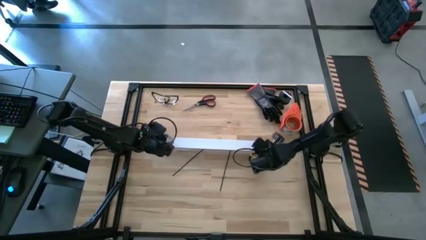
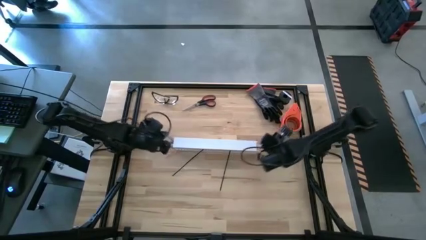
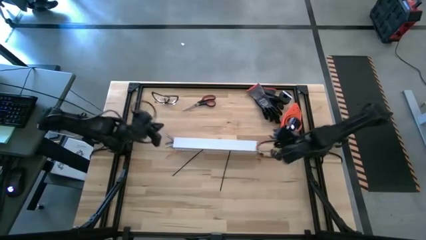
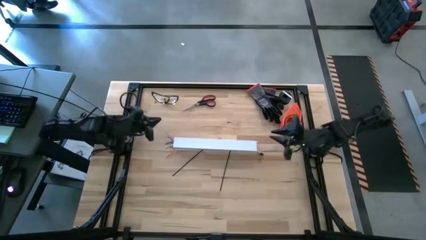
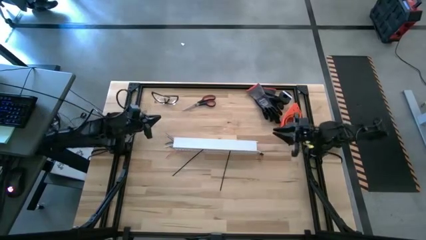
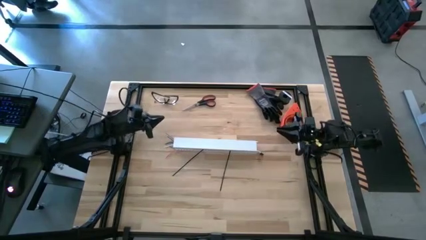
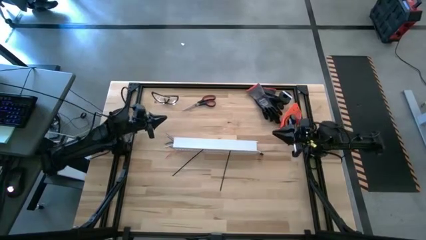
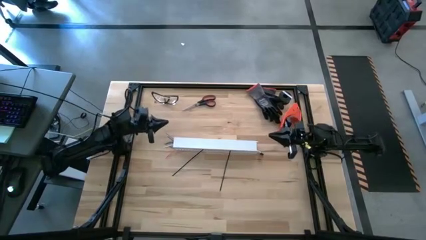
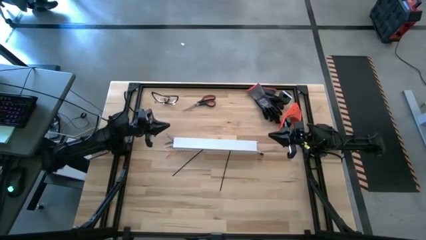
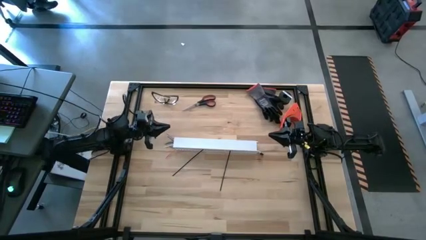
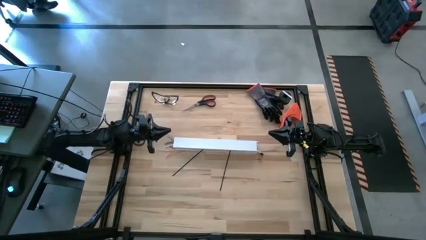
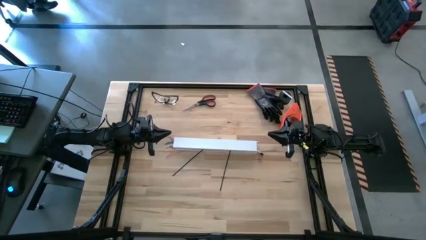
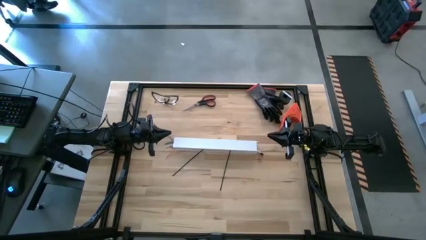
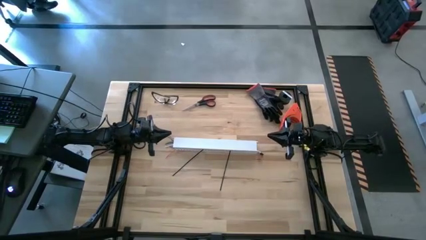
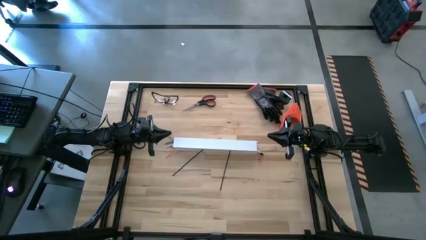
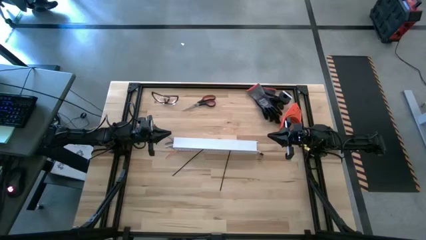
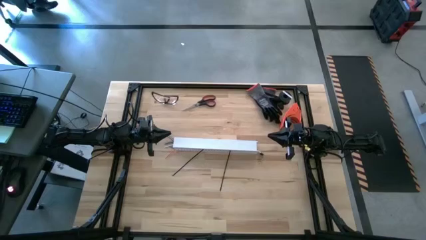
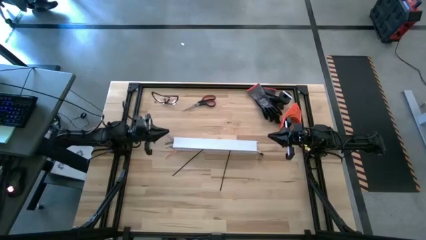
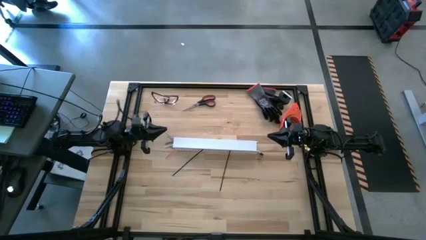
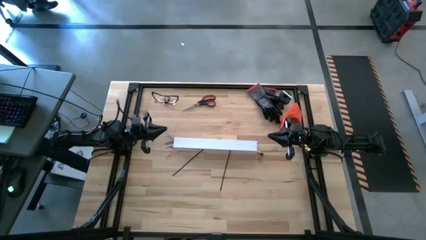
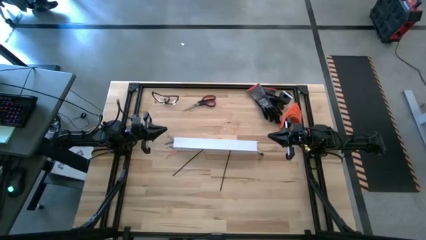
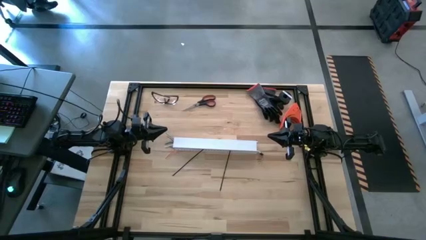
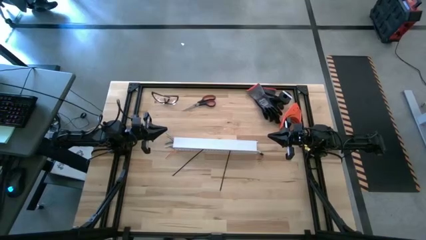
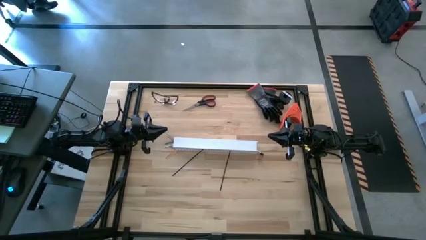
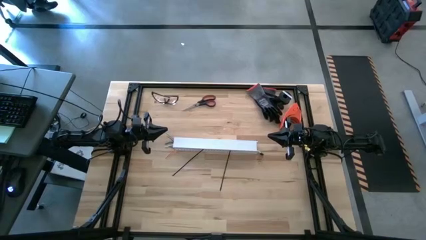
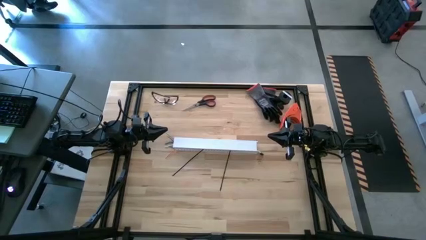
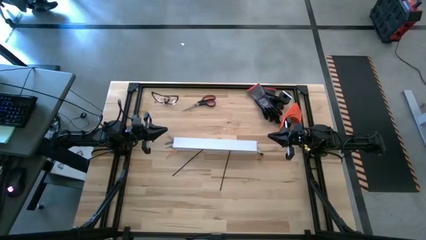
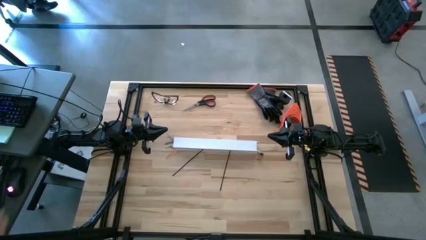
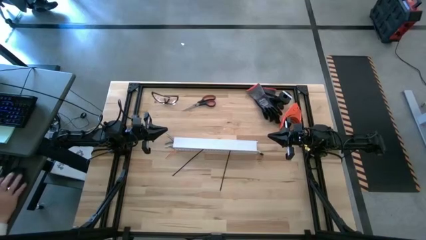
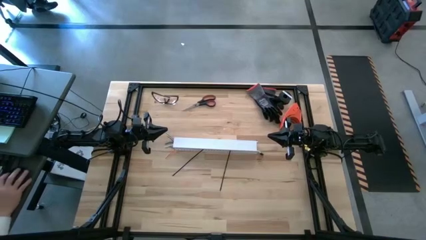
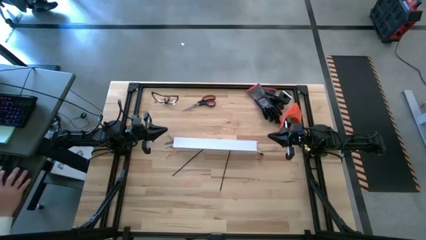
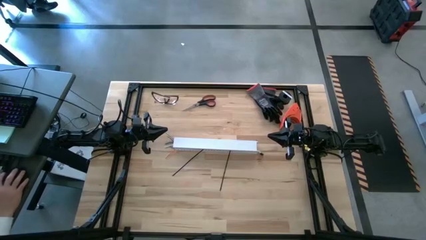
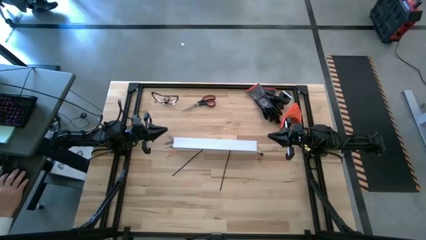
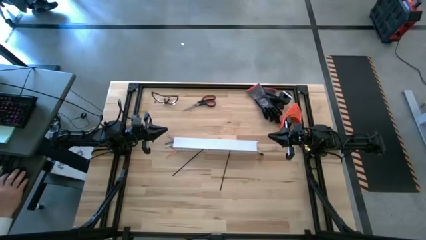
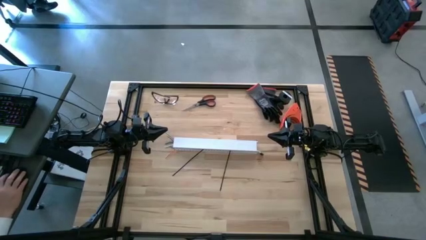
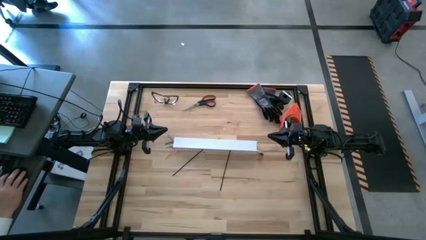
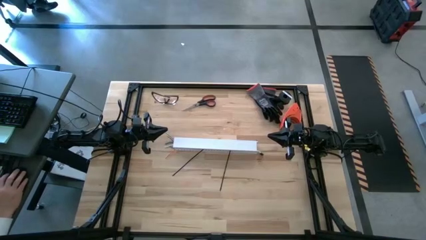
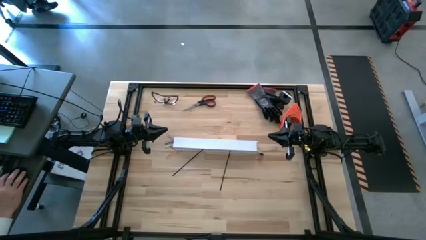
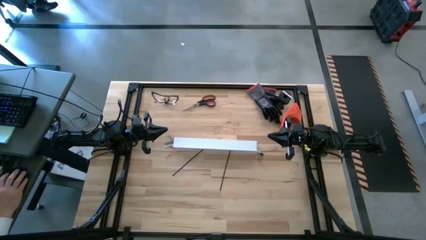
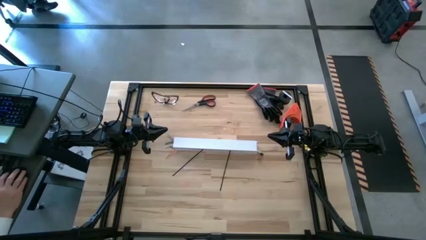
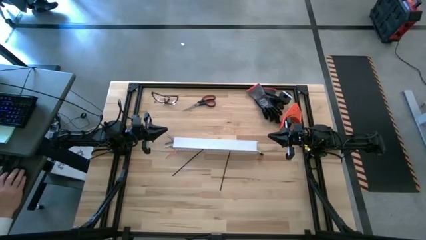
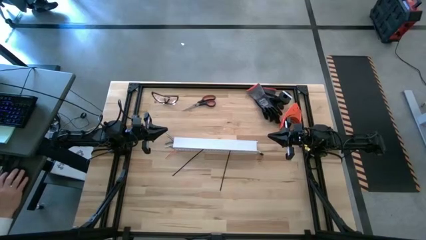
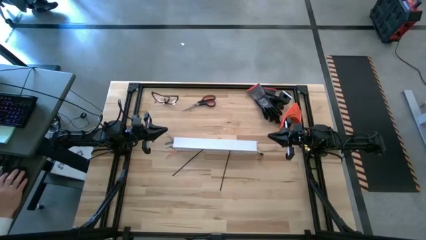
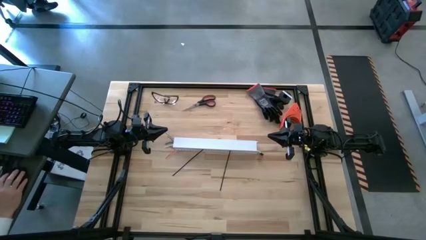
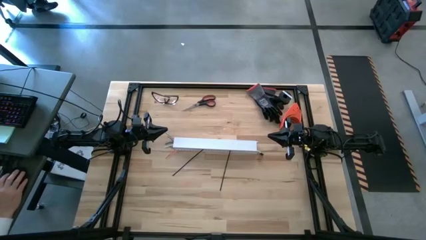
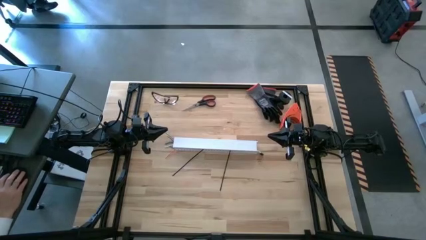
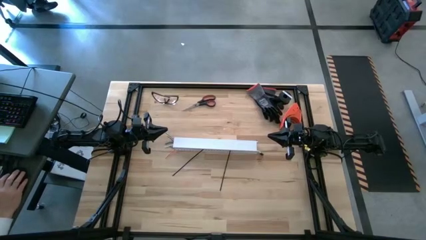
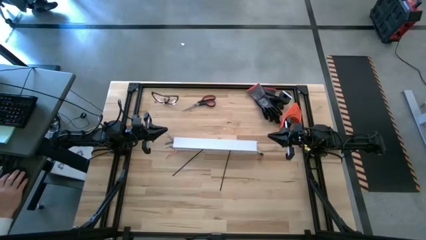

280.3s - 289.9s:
Task: Ziptie cables
Return to Home Position
